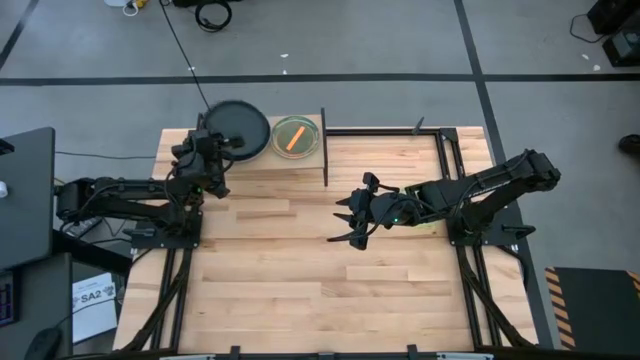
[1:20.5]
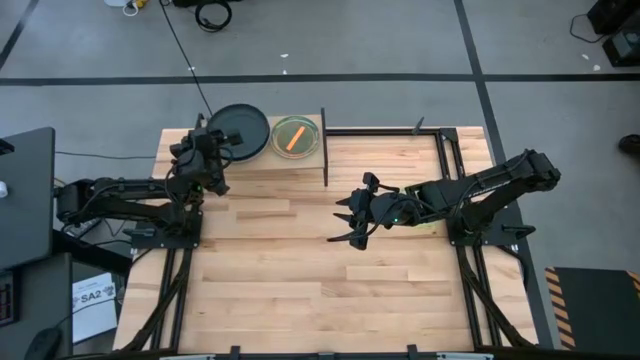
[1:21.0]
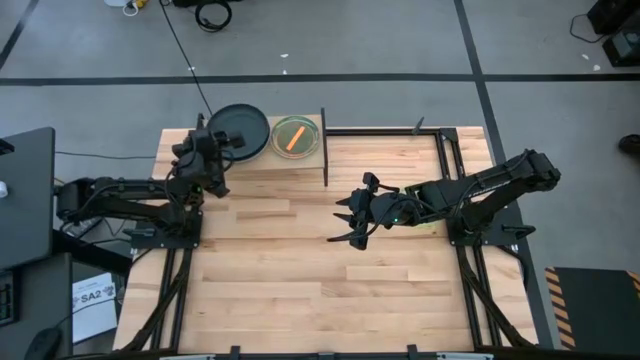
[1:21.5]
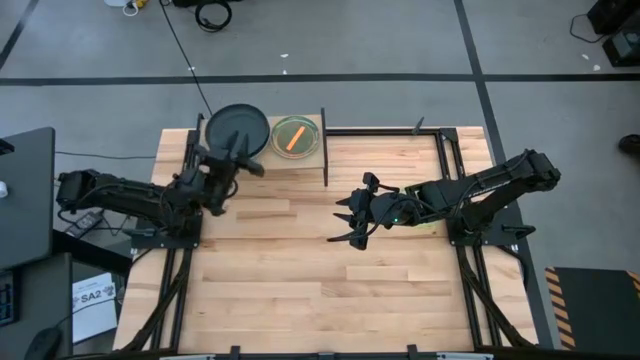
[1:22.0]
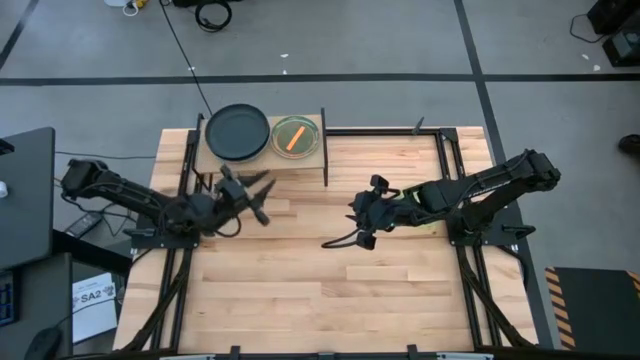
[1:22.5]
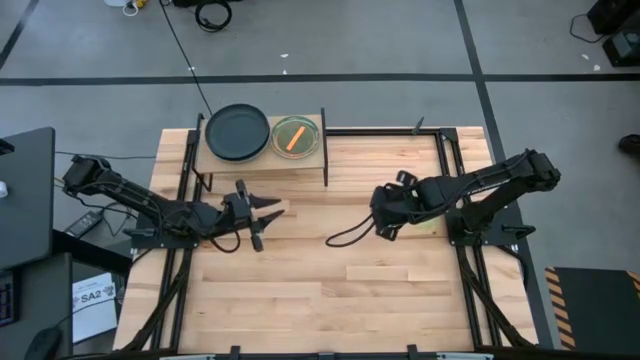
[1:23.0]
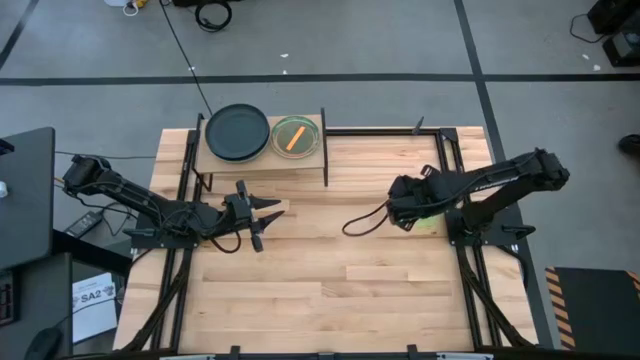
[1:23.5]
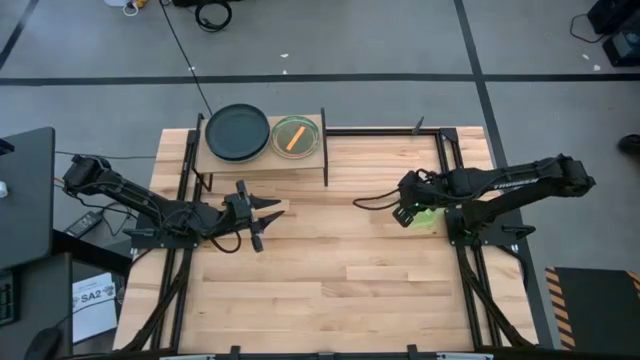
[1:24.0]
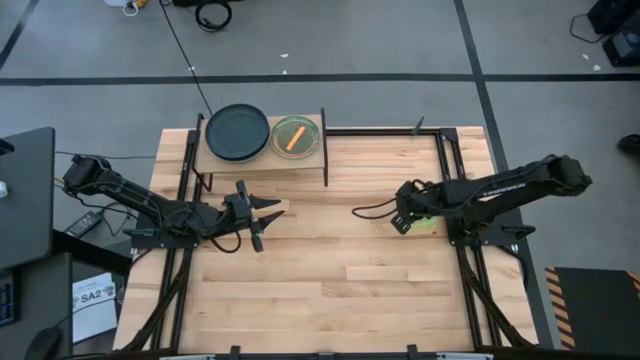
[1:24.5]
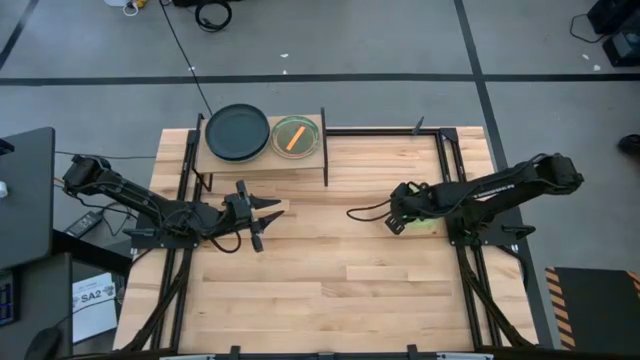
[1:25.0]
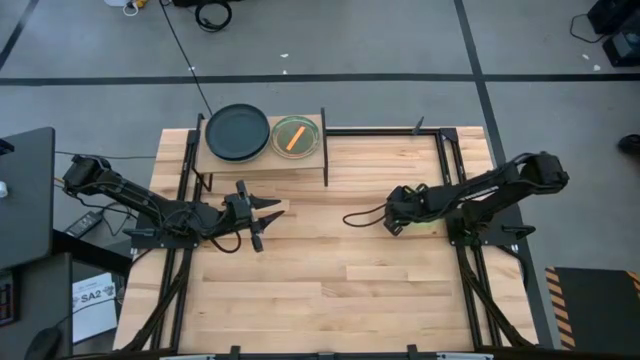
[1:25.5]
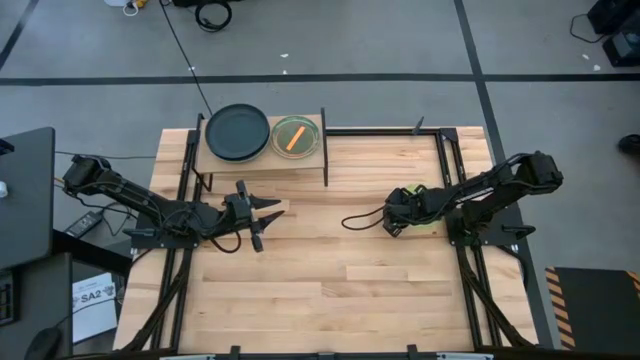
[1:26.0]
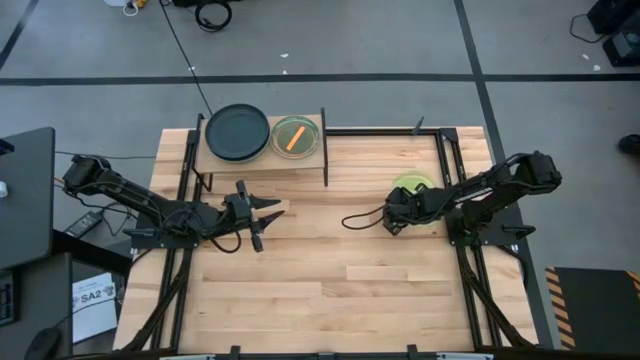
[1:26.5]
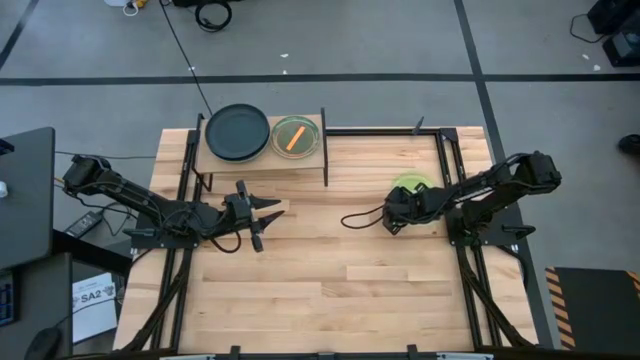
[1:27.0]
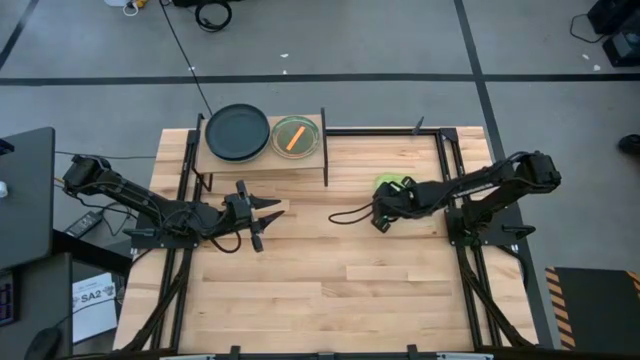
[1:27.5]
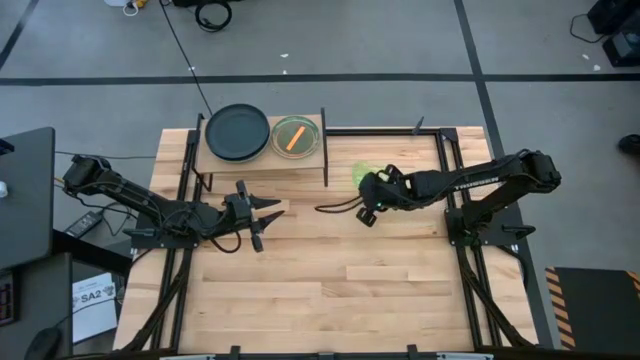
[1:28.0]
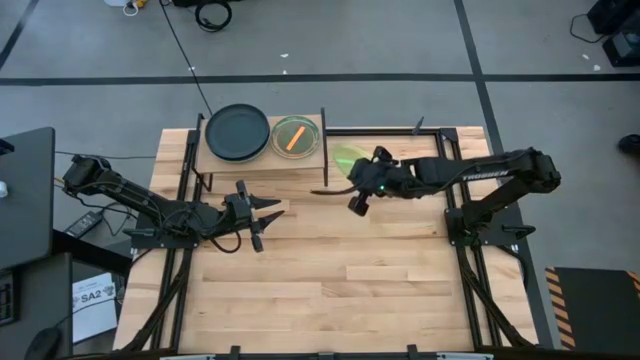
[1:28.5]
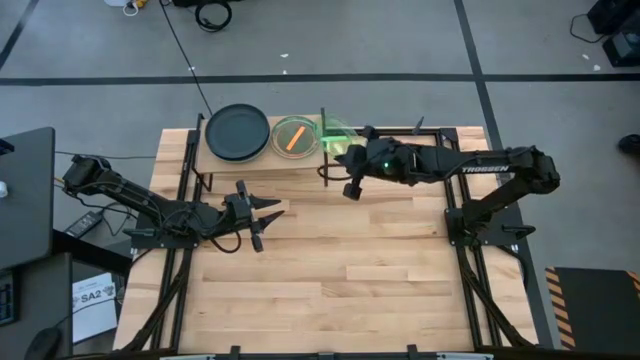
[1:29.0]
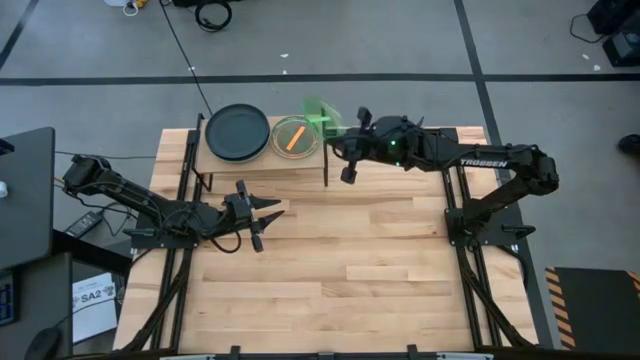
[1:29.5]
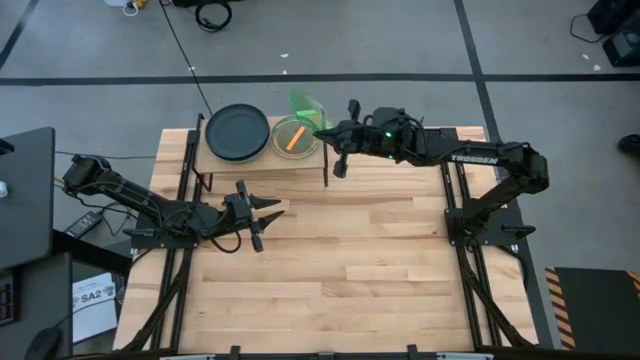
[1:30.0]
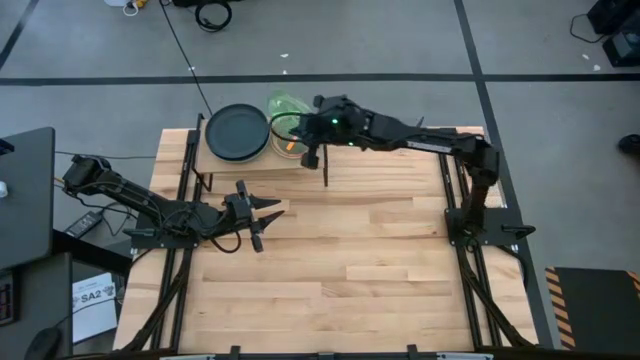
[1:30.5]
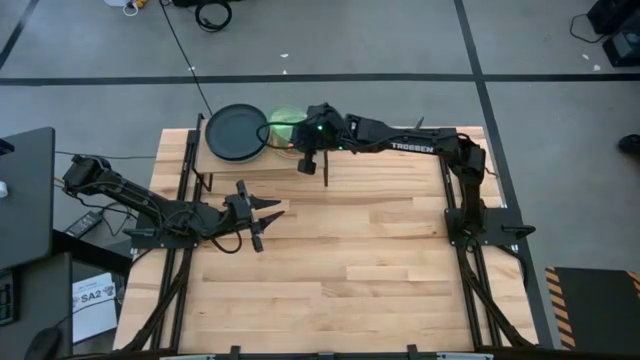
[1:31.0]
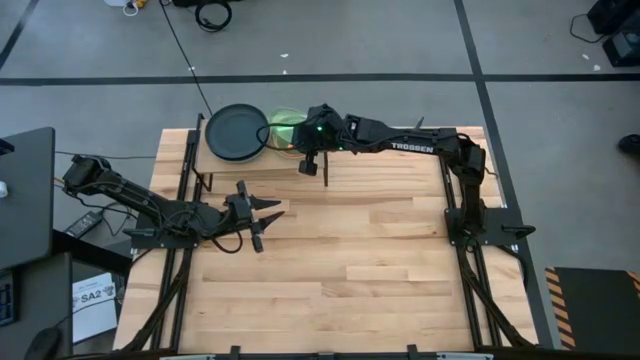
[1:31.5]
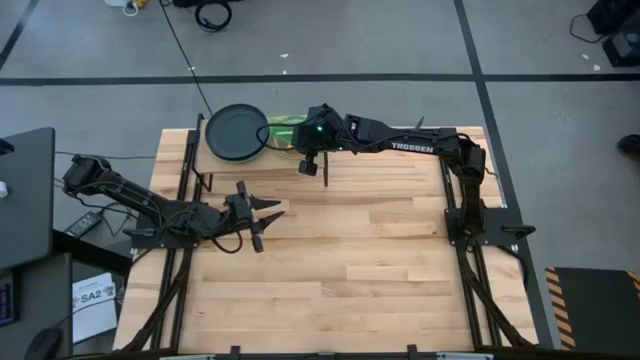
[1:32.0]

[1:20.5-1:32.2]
Task: Place and stack plates onto a shelf
Stack the green plate on top of the orange plate on the shelf

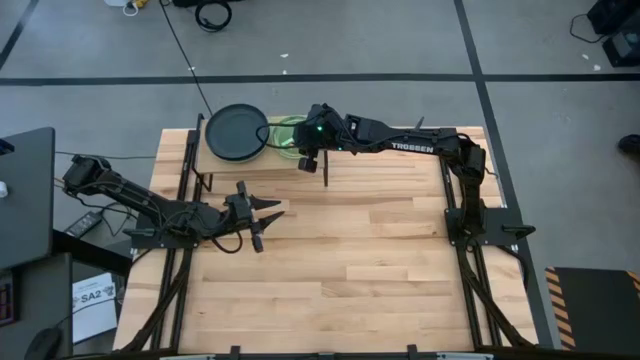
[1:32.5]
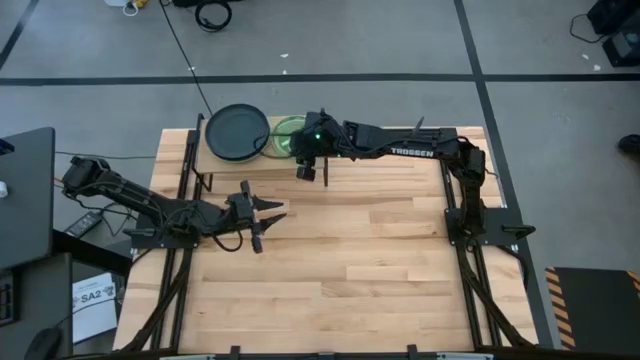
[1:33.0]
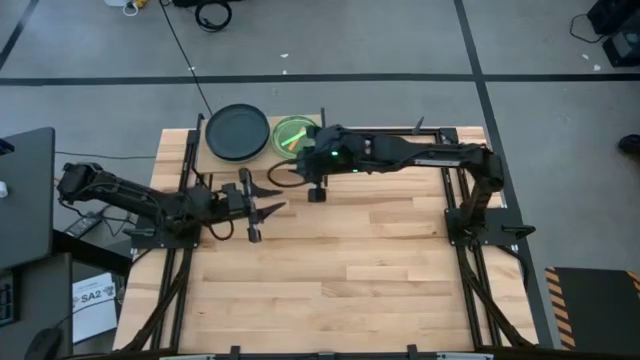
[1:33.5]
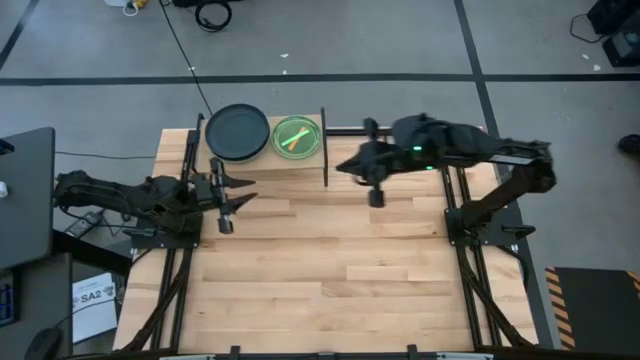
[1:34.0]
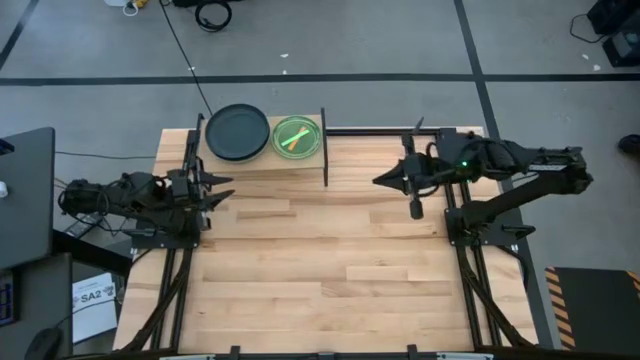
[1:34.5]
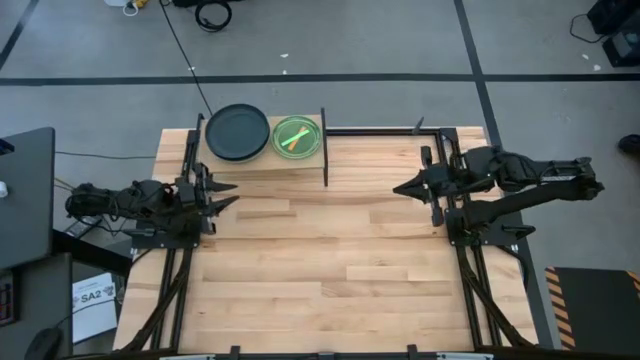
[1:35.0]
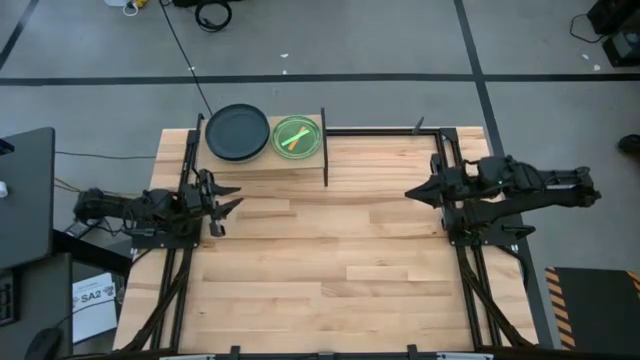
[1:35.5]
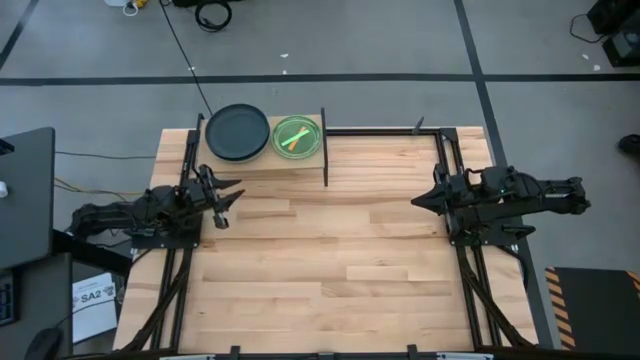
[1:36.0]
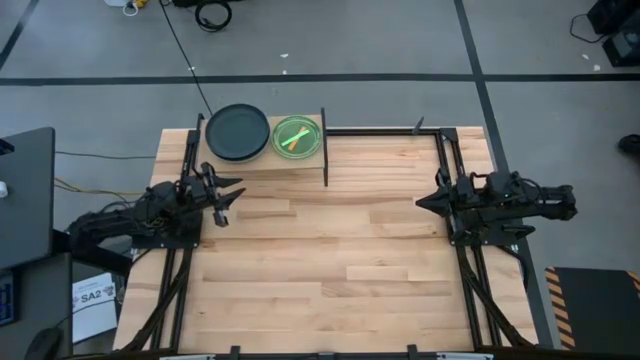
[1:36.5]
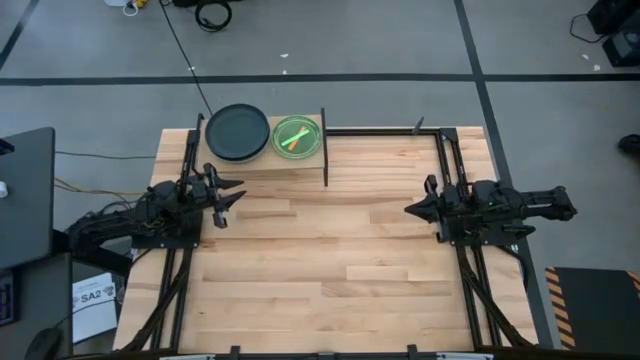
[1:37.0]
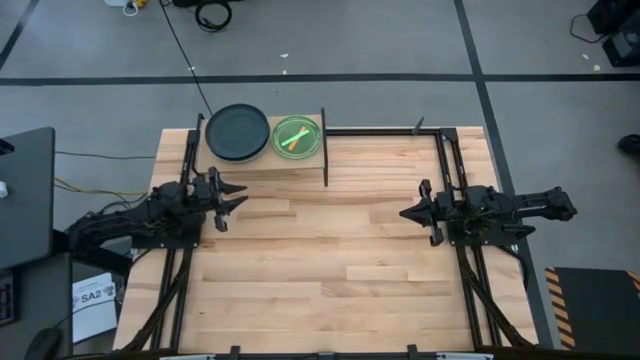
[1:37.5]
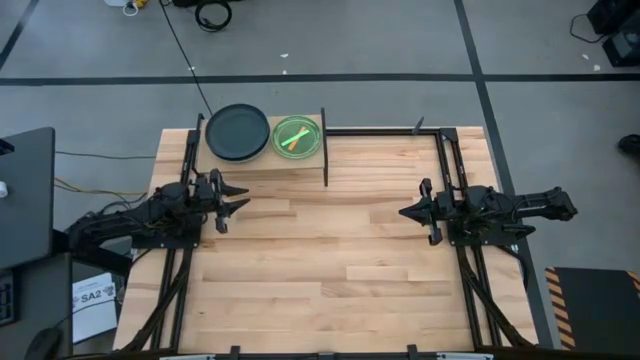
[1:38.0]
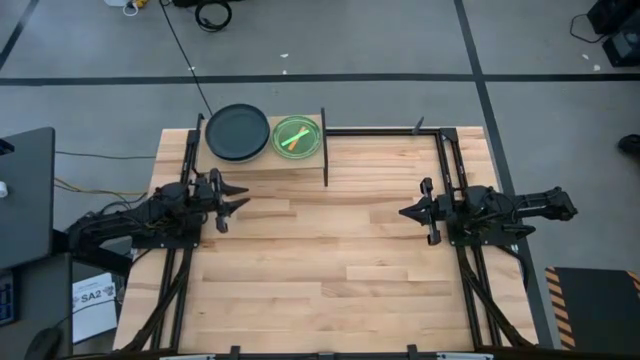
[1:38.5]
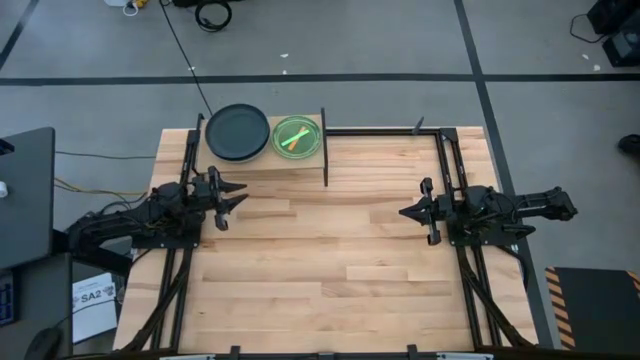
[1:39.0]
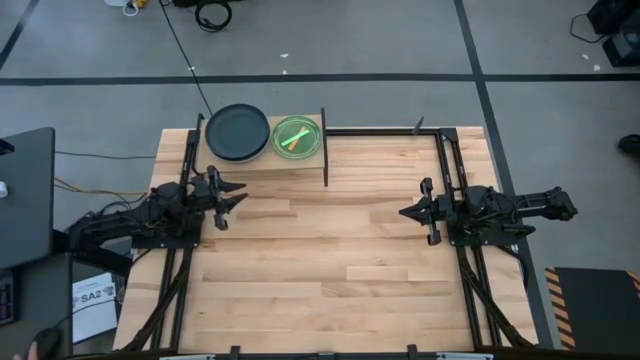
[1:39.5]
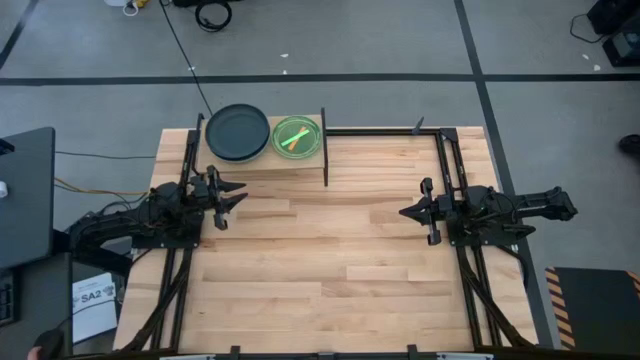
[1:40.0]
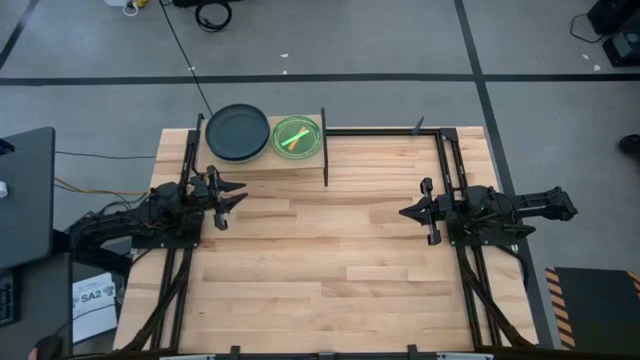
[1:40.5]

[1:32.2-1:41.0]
Return to Home Position

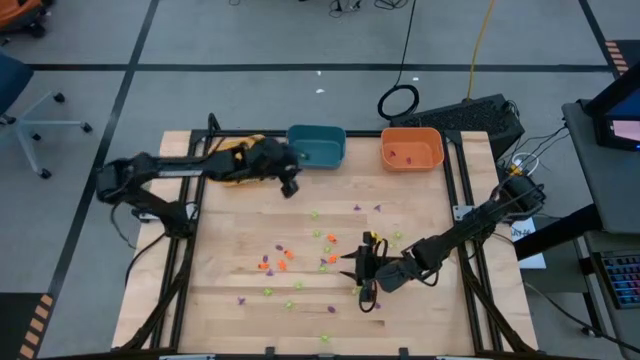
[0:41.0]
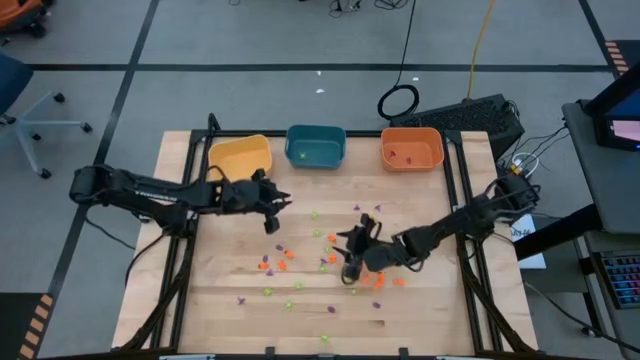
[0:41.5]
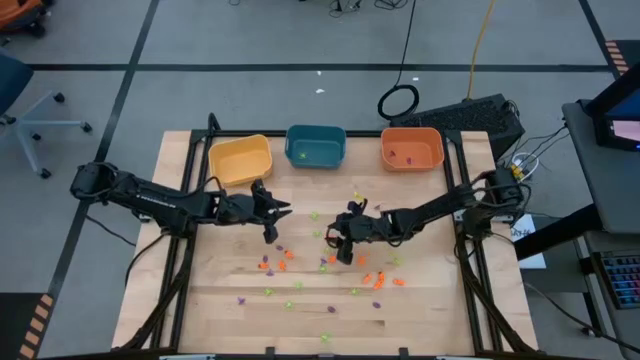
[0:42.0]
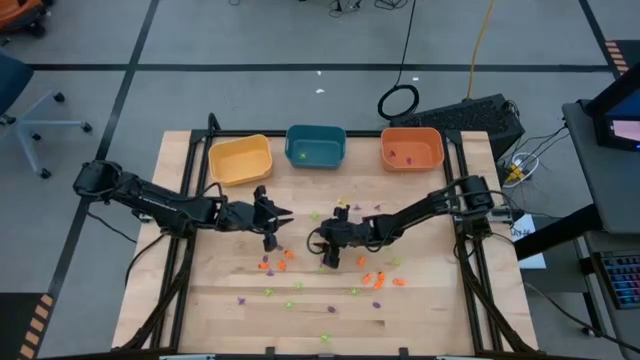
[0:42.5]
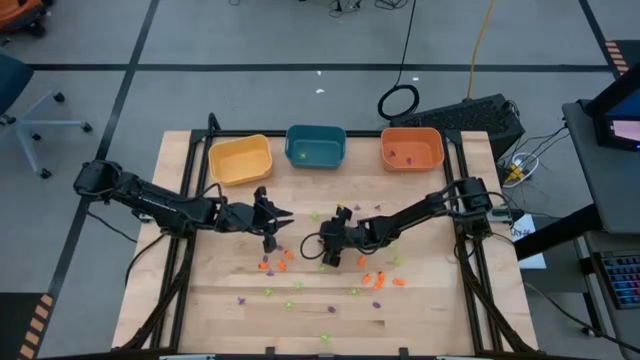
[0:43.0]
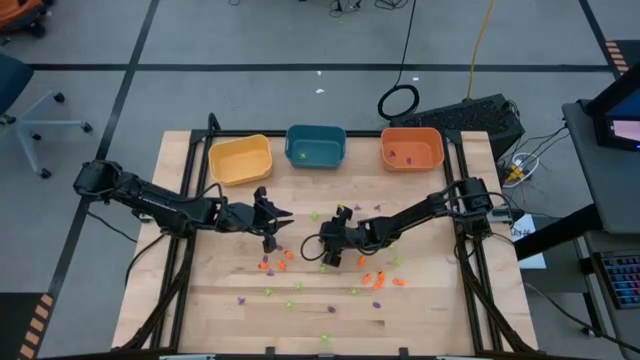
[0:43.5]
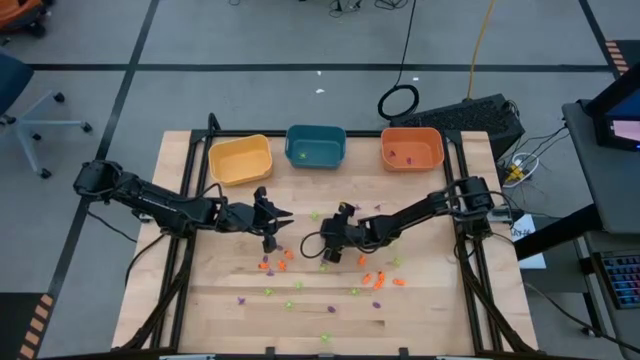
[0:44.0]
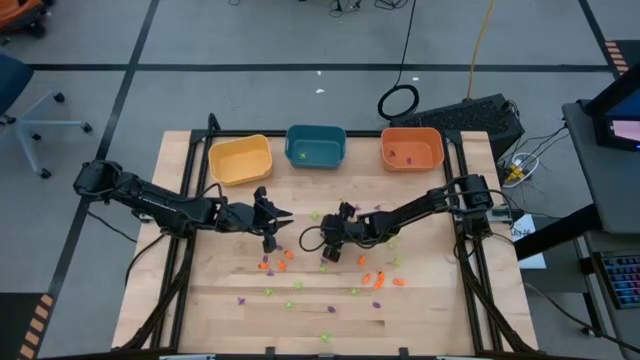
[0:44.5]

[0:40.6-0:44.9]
Task: Sort Halloween decoration
Put the green spider toy into the blue bin
